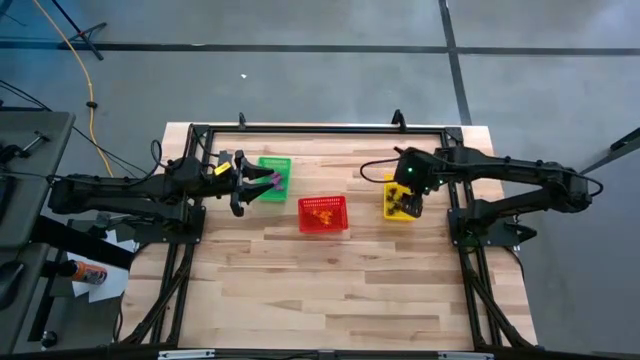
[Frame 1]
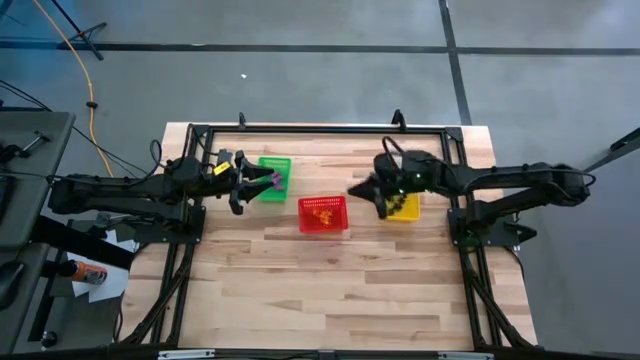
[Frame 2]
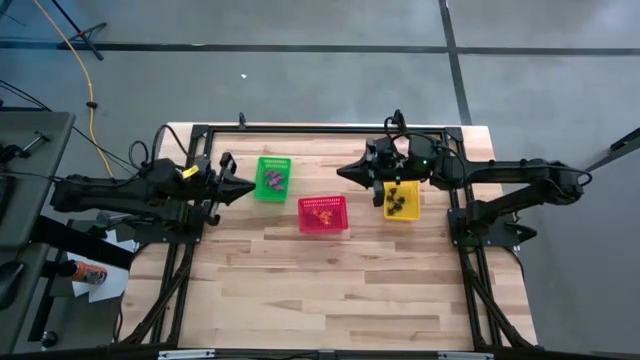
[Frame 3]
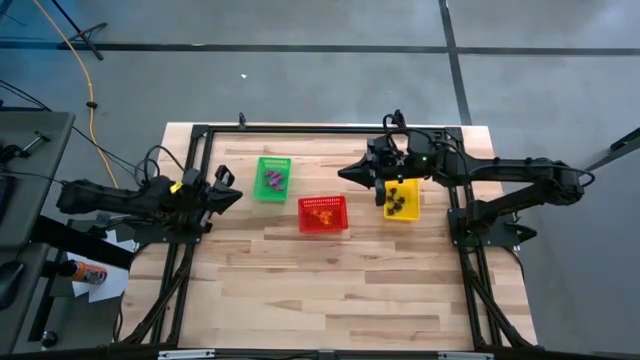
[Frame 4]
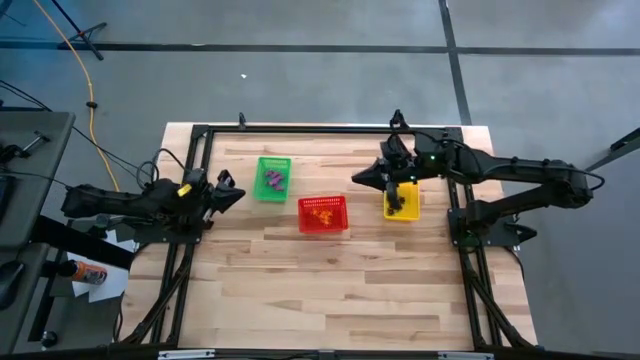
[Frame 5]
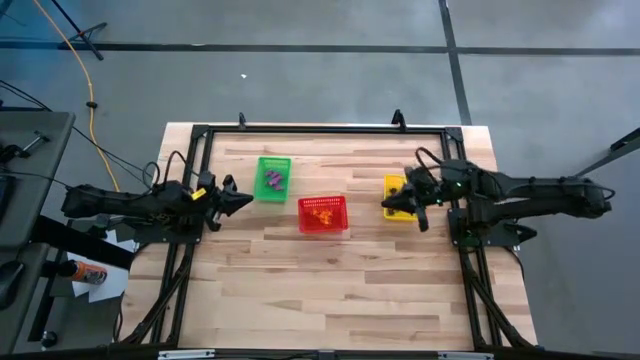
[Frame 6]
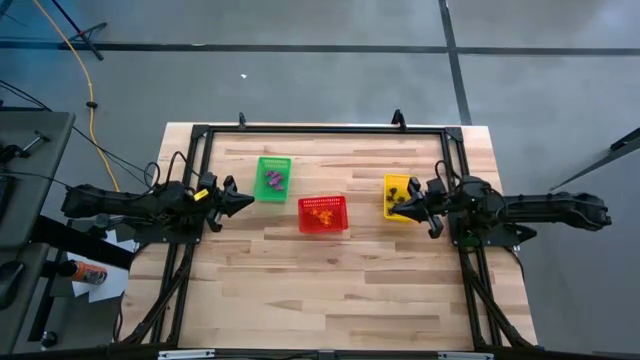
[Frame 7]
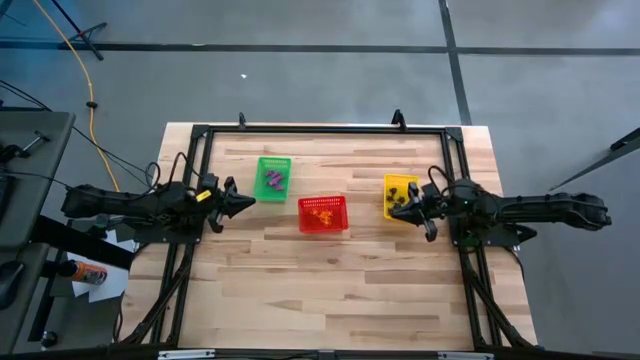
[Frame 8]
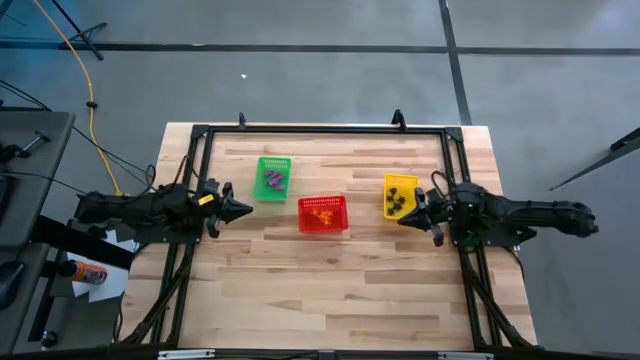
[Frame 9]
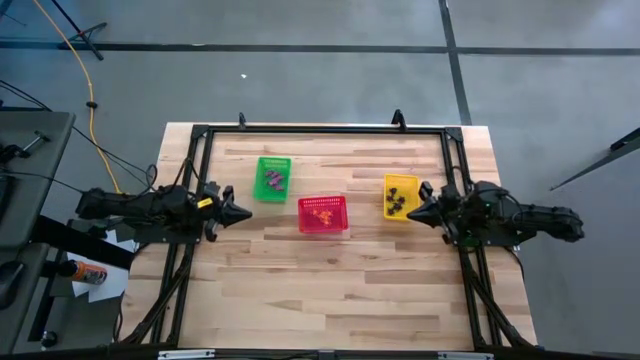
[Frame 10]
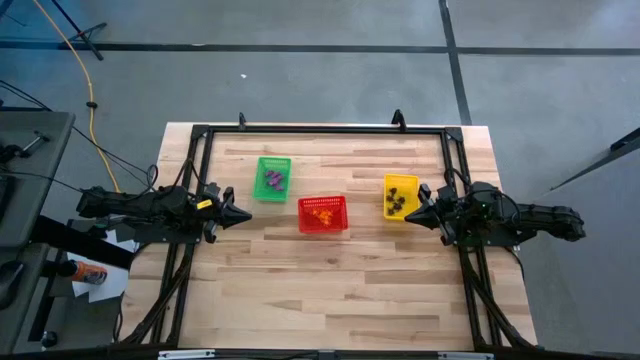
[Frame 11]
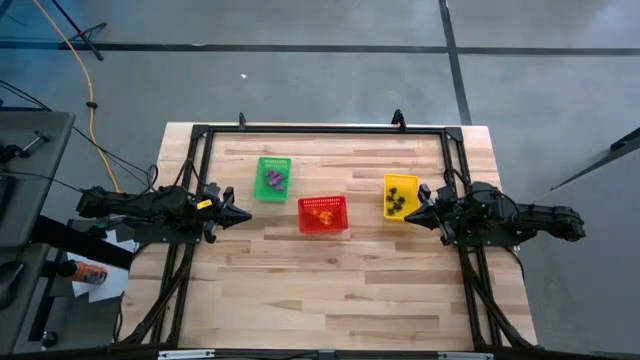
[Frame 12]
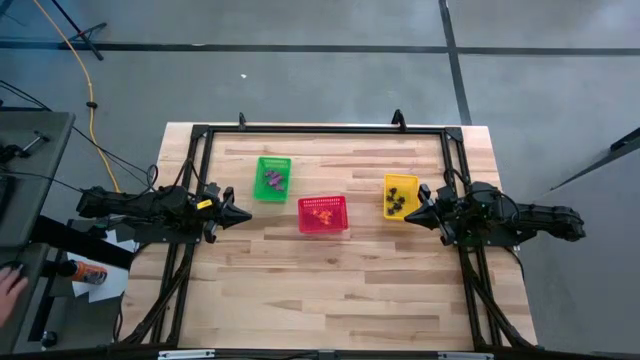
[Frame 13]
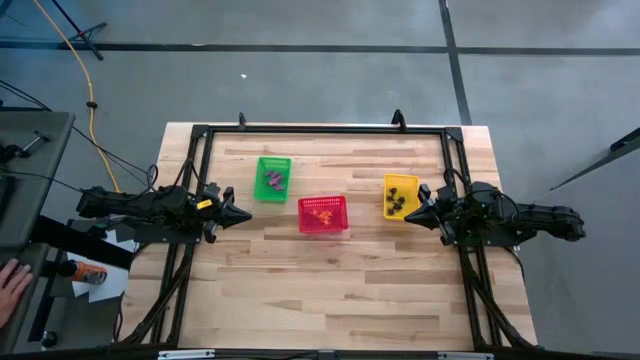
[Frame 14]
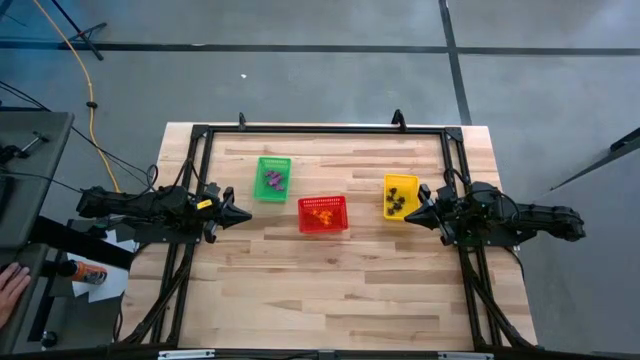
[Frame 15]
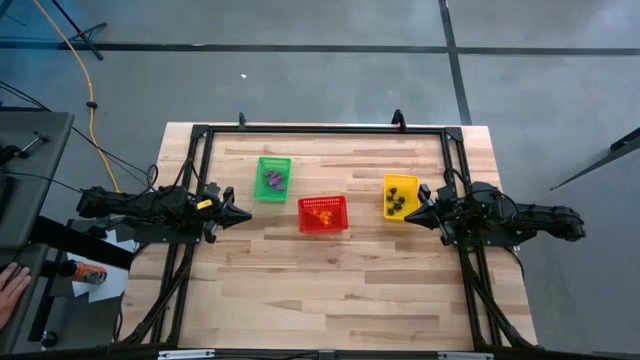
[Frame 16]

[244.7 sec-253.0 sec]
Task: Sort Halloween decoration
Return to Home Position

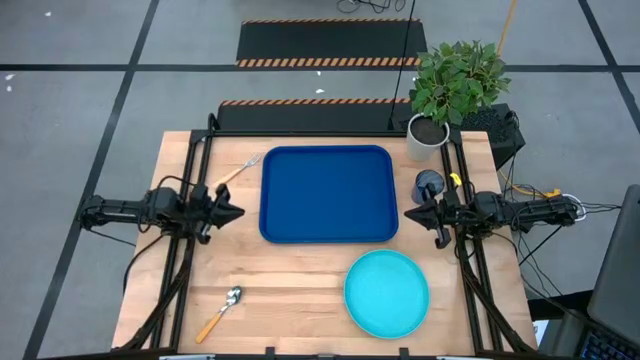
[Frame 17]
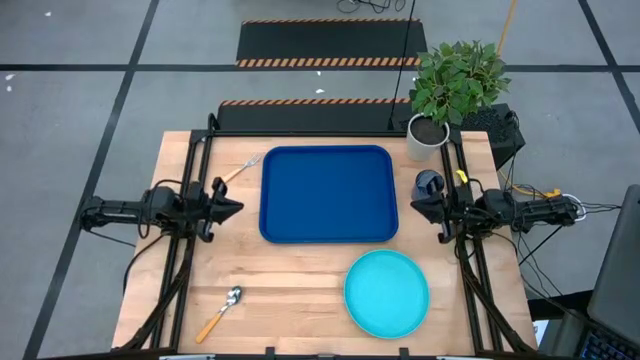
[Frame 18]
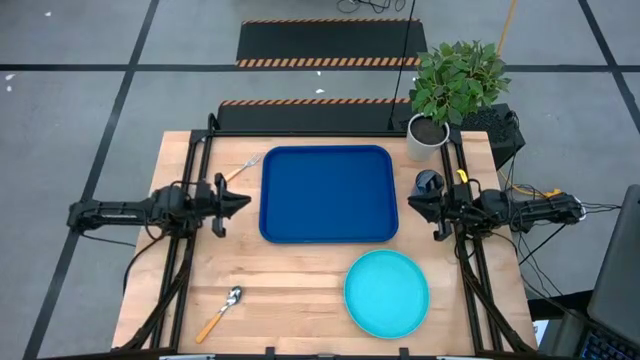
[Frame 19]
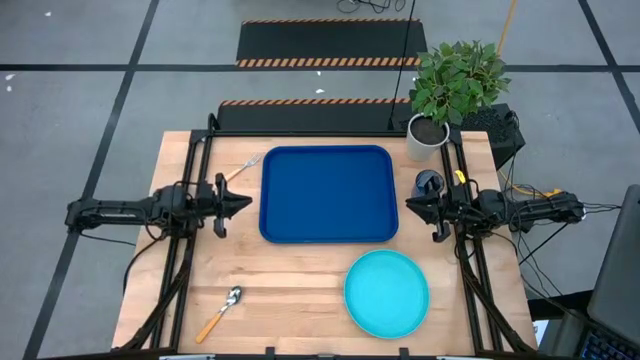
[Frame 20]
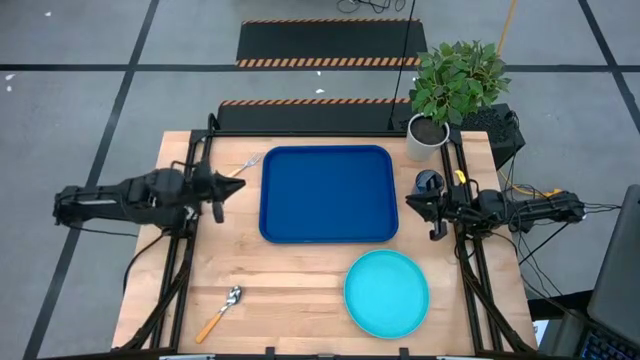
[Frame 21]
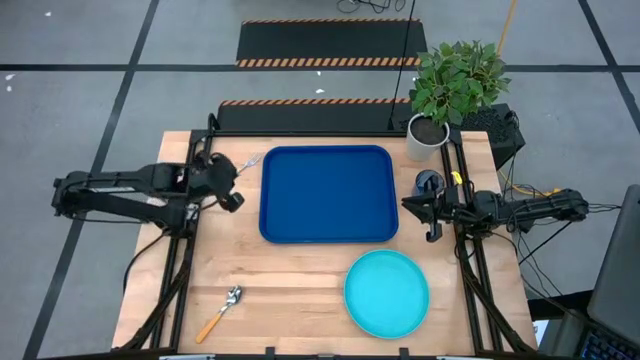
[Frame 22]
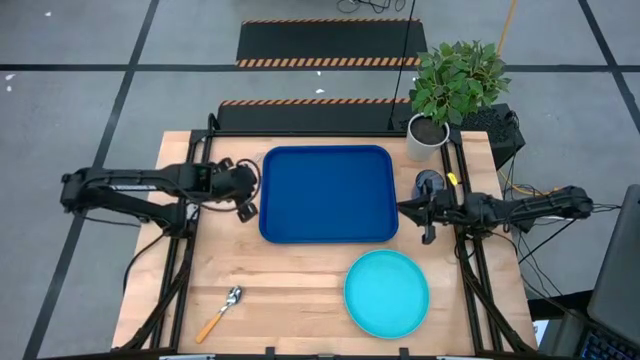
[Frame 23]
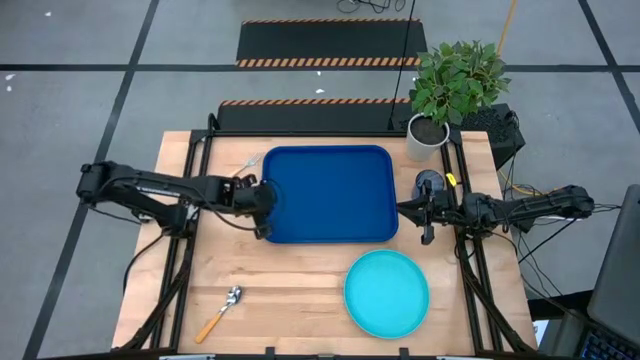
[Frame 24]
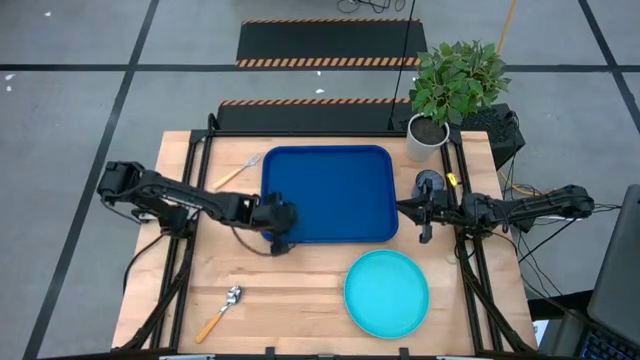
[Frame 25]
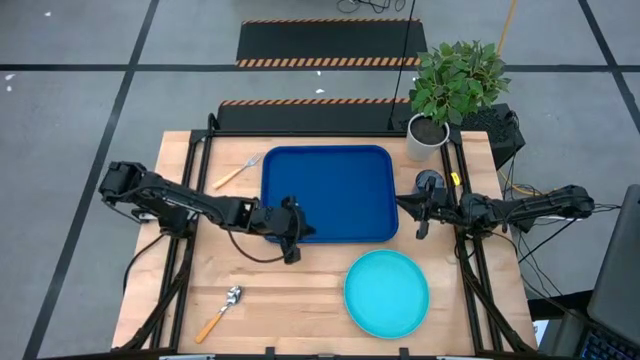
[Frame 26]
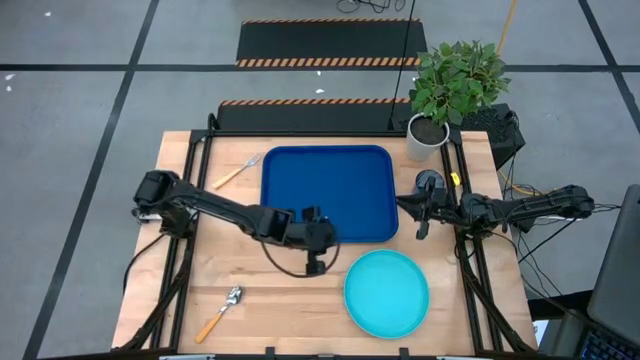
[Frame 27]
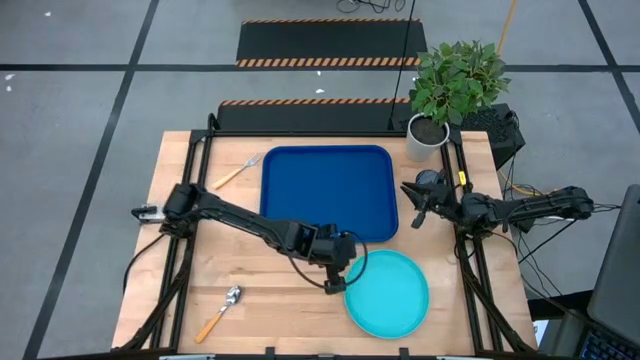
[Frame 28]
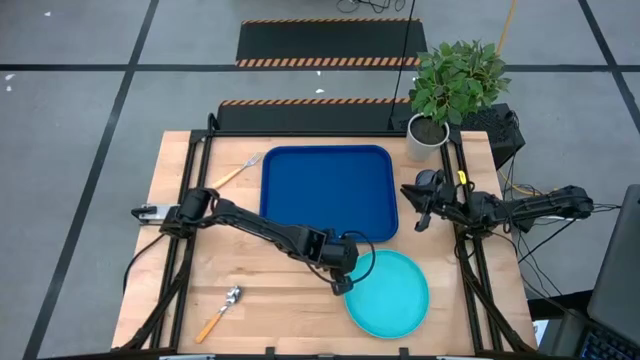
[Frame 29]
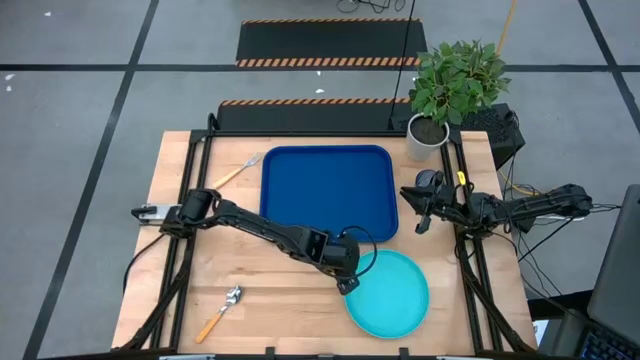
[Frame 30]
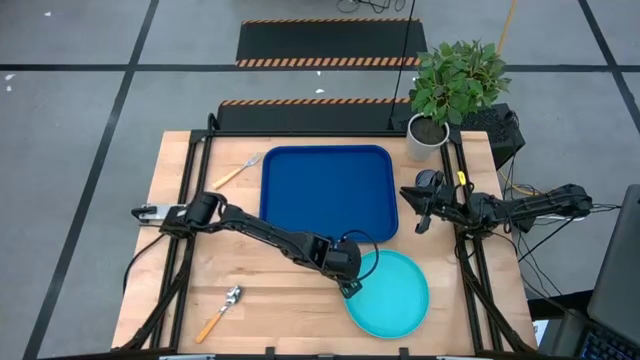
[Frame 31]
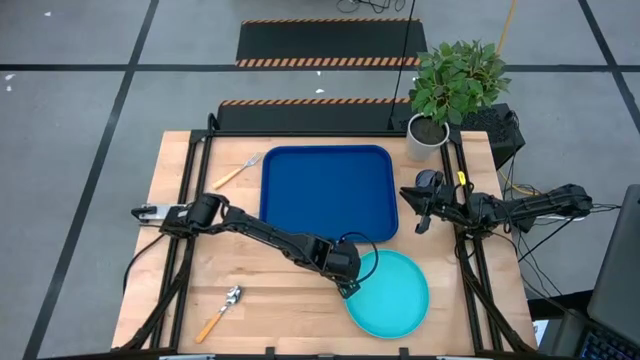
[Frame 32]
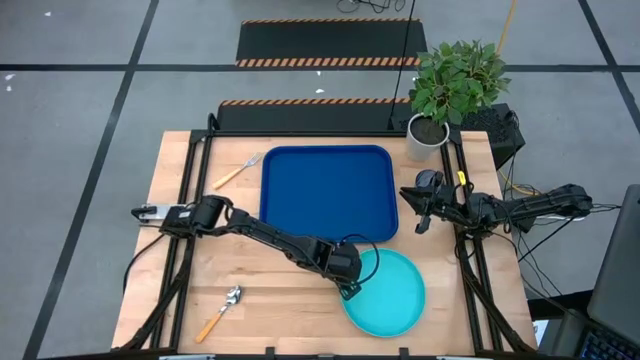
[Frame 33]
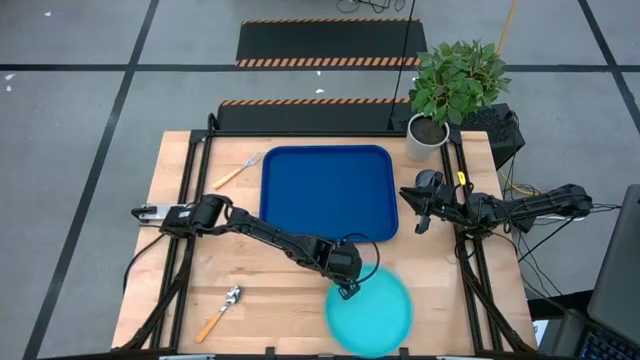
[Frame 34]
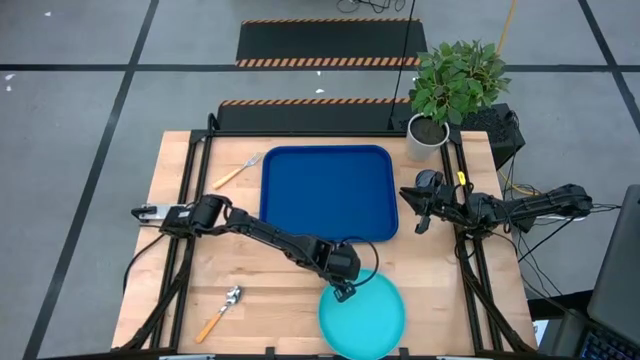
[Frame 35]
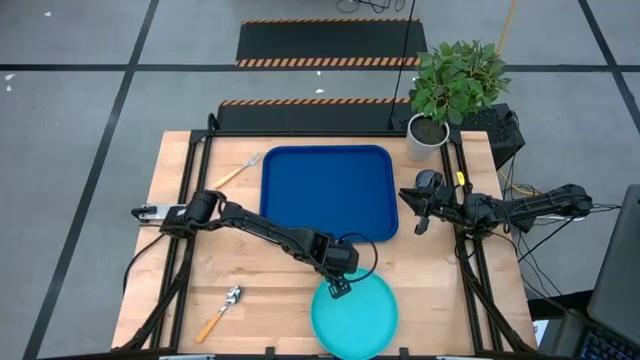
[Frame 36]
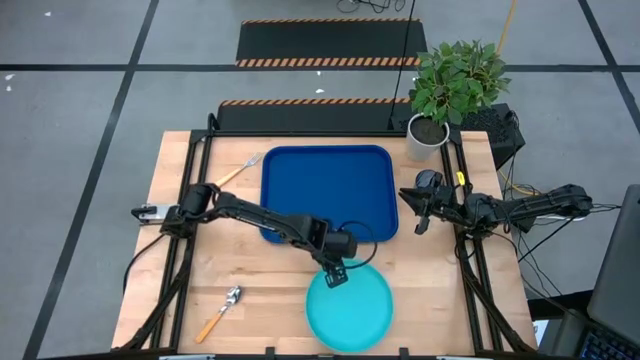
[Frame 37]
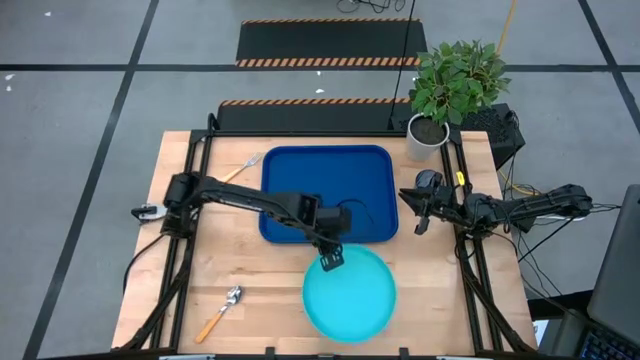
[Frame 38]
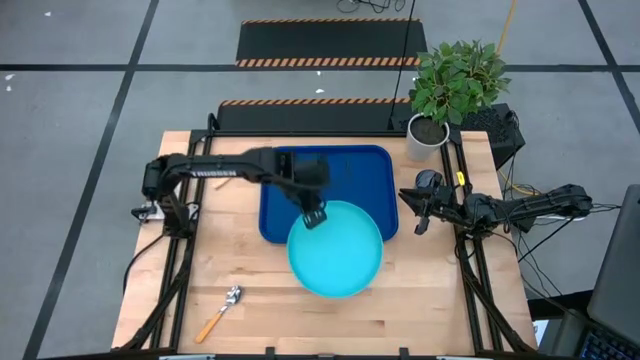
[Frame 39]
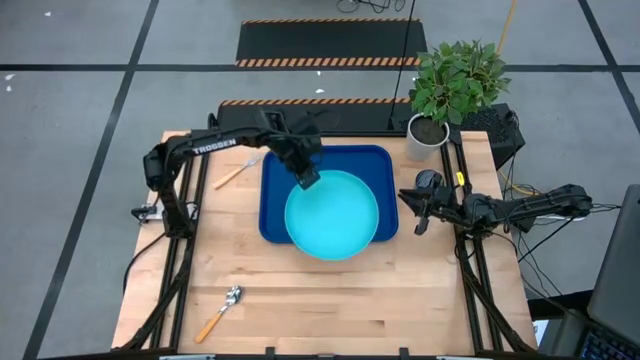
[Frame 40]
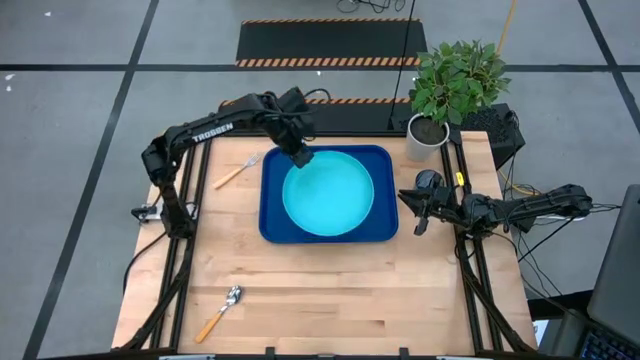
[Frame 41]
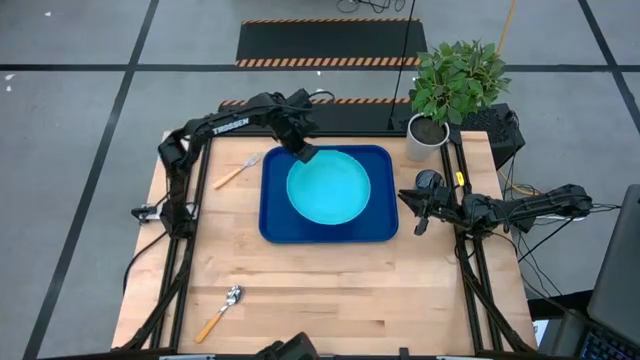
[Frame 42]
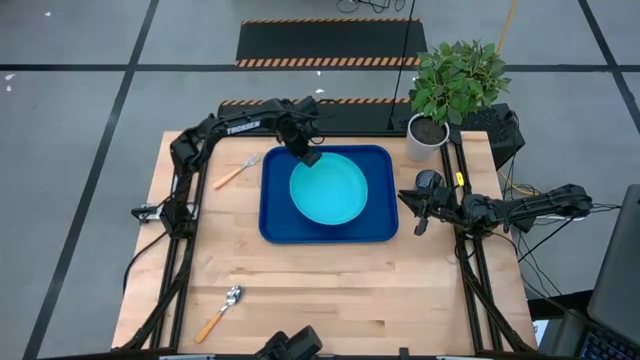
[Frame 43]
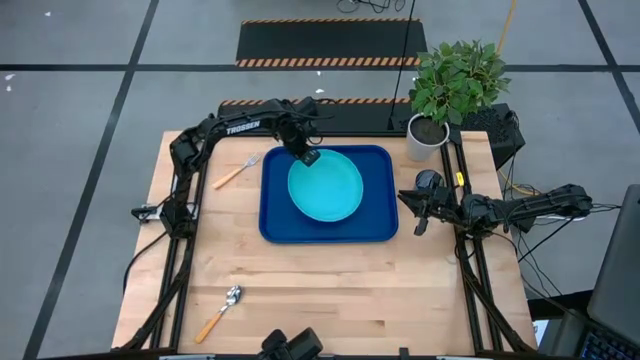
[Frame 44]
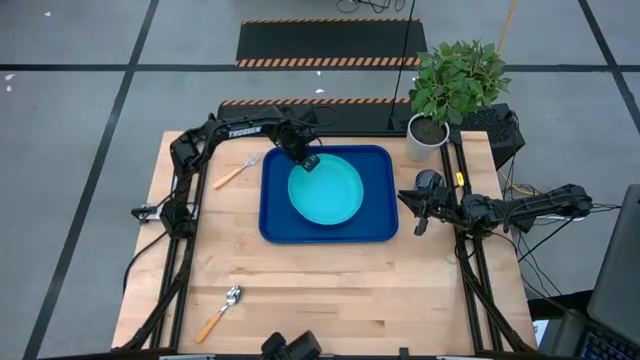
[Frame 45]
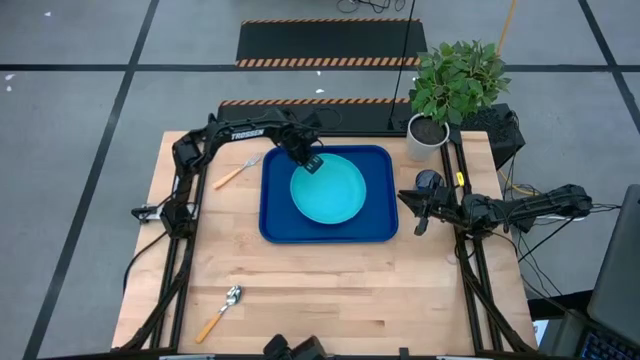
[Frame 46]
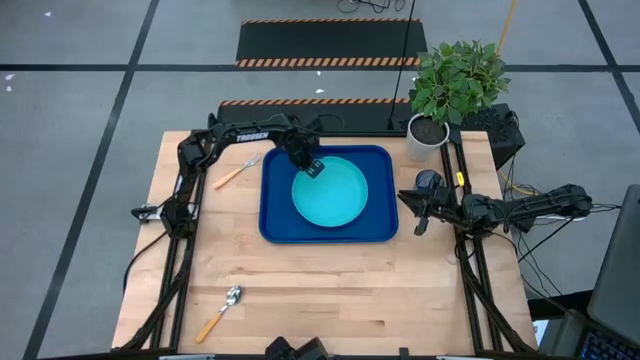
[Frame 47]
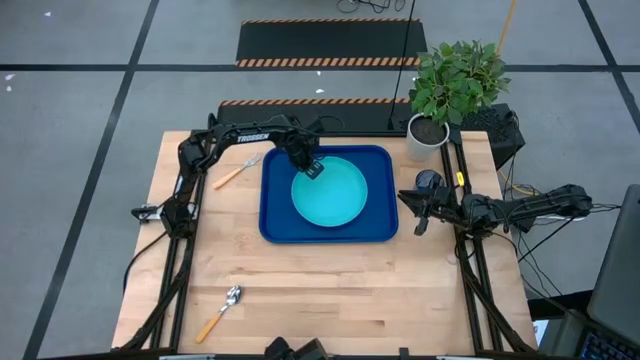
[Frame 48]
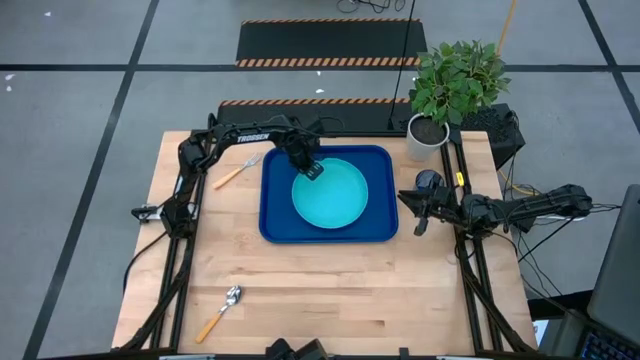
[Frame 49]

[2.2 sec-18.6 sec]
Task: Pick and place plate/cup/fork/spoon on tray
Put the light blue plate on the blue tray
